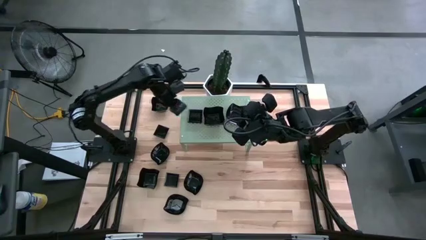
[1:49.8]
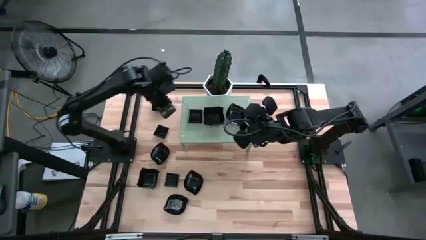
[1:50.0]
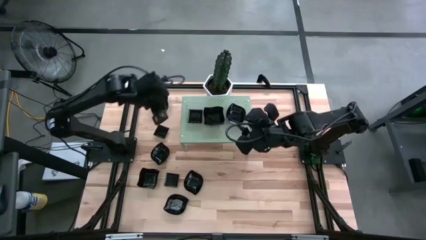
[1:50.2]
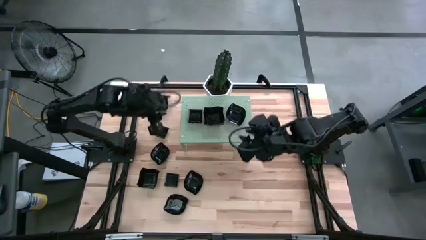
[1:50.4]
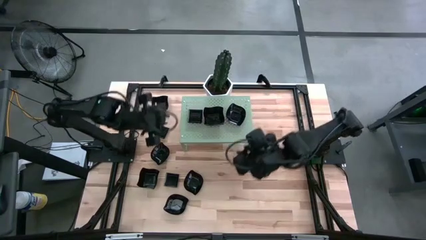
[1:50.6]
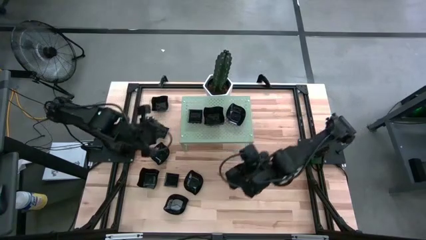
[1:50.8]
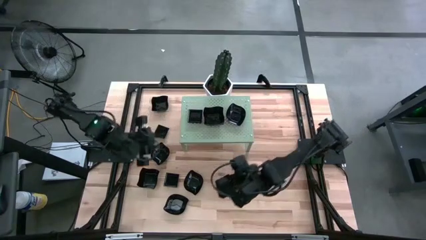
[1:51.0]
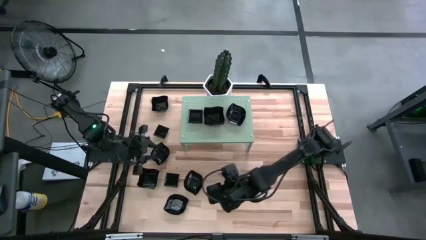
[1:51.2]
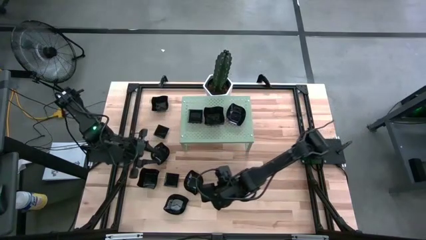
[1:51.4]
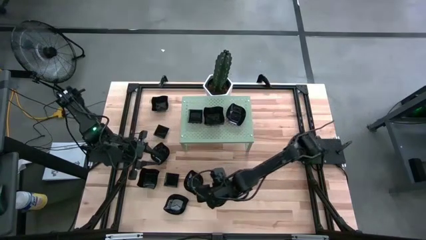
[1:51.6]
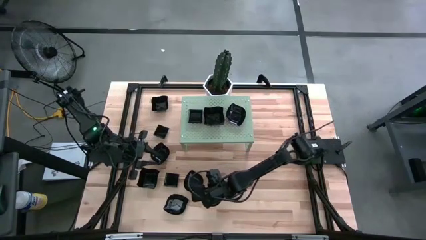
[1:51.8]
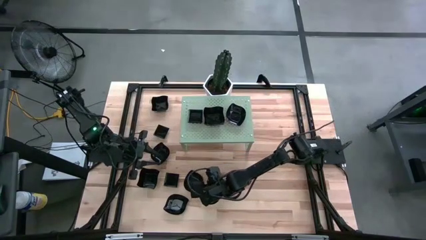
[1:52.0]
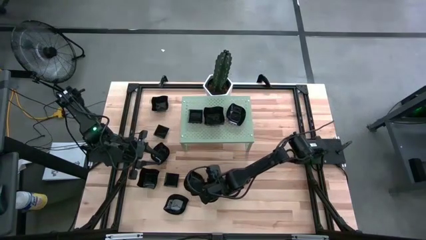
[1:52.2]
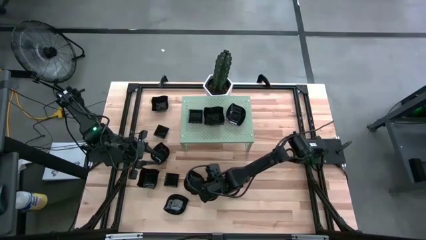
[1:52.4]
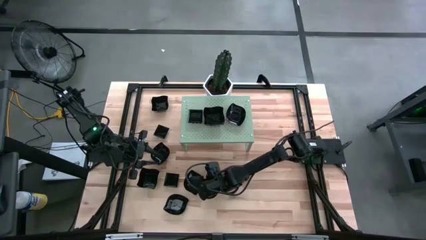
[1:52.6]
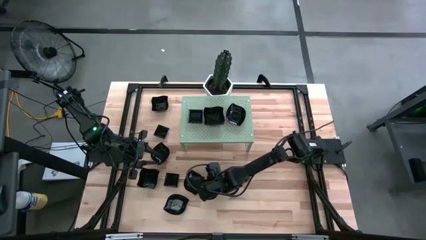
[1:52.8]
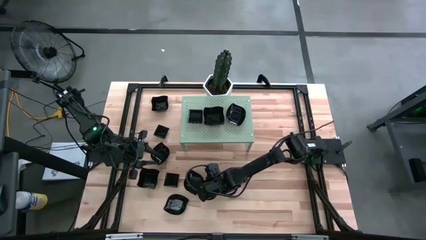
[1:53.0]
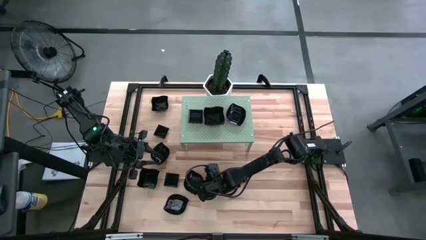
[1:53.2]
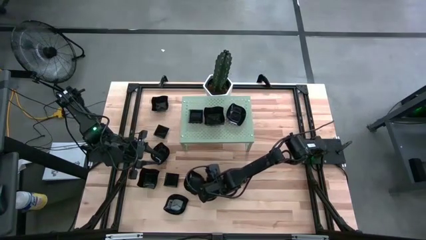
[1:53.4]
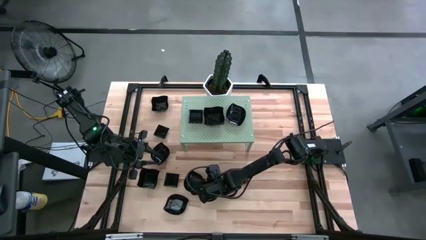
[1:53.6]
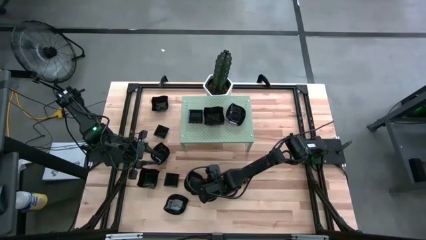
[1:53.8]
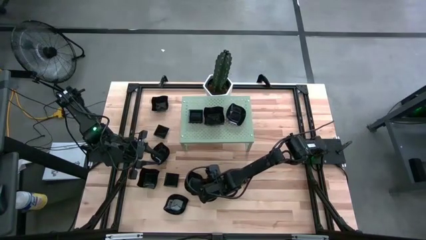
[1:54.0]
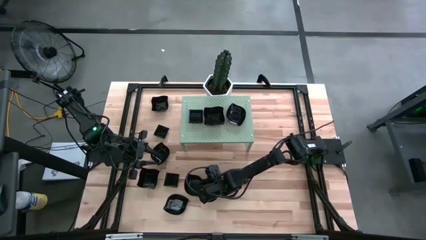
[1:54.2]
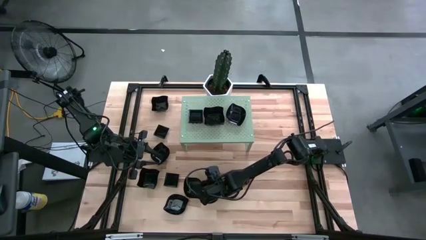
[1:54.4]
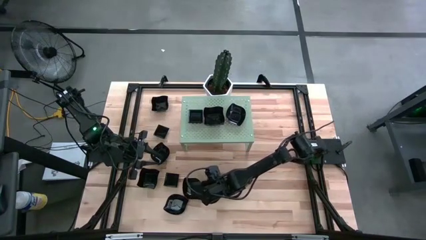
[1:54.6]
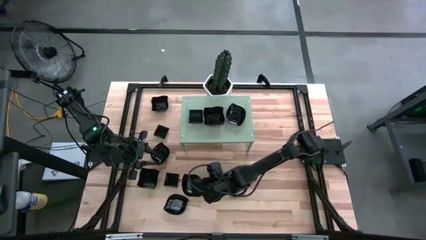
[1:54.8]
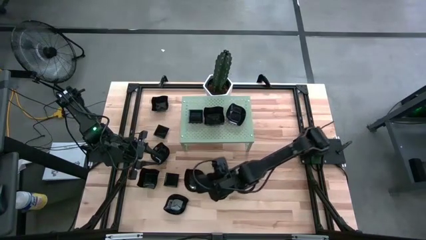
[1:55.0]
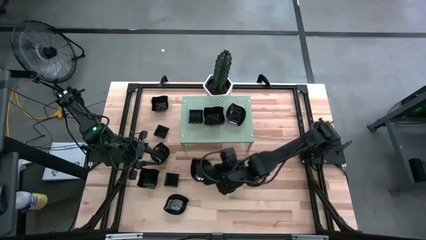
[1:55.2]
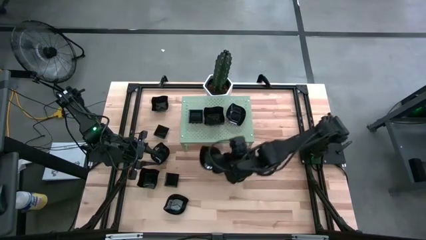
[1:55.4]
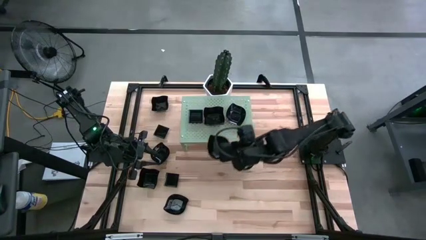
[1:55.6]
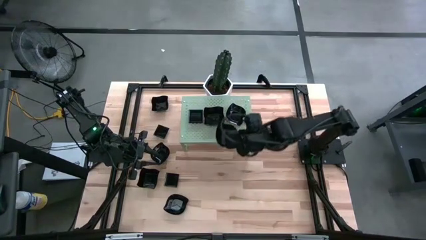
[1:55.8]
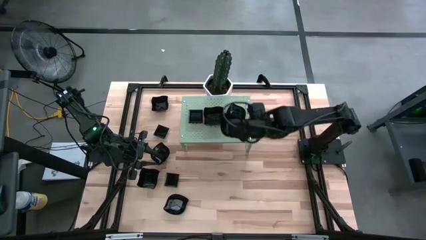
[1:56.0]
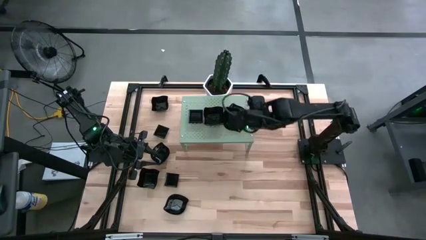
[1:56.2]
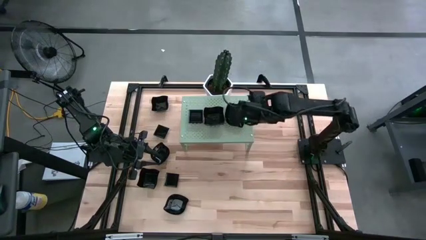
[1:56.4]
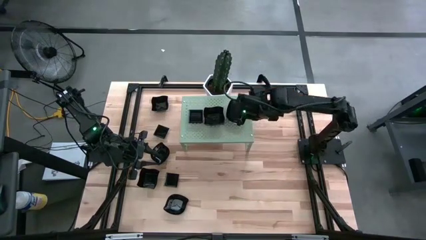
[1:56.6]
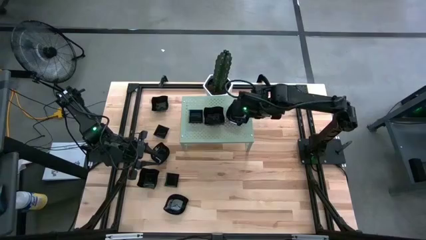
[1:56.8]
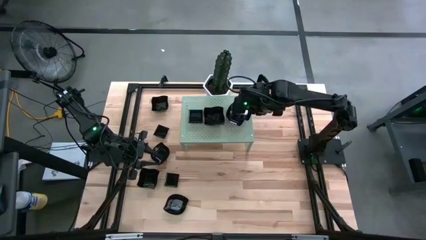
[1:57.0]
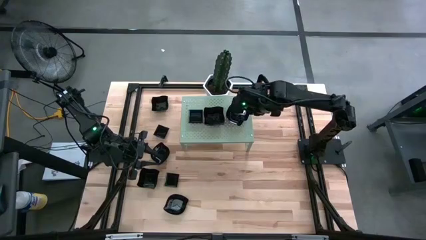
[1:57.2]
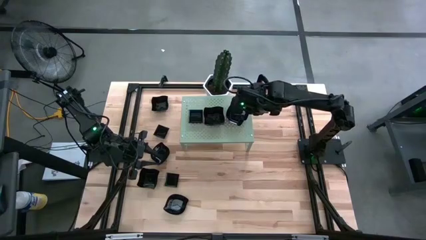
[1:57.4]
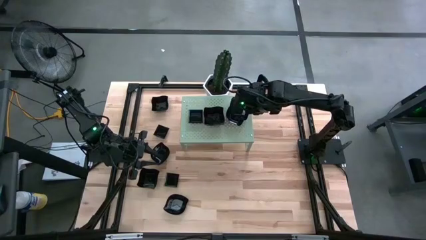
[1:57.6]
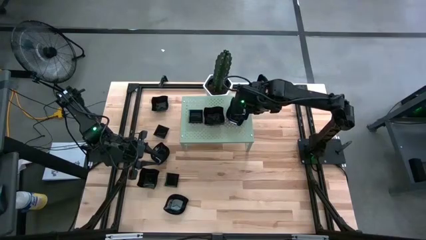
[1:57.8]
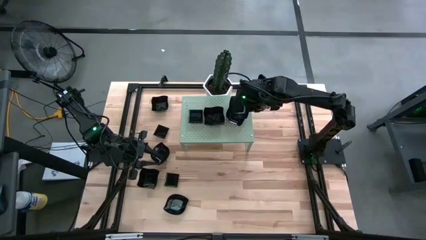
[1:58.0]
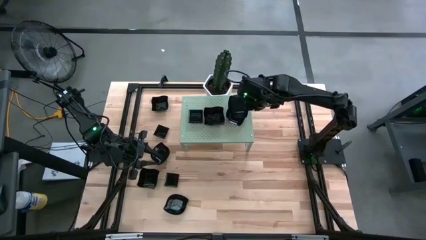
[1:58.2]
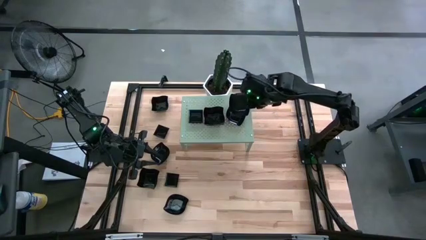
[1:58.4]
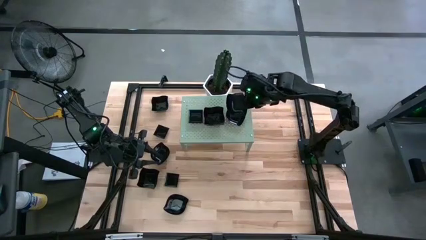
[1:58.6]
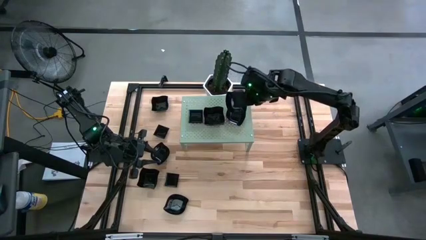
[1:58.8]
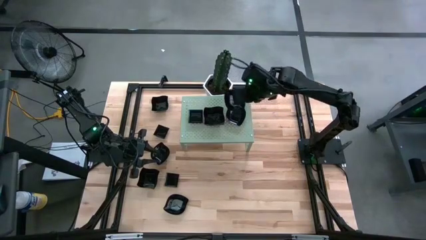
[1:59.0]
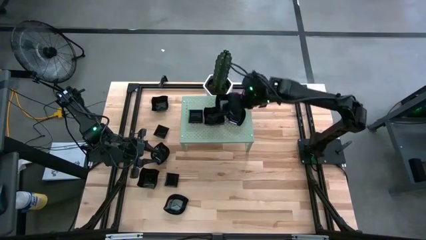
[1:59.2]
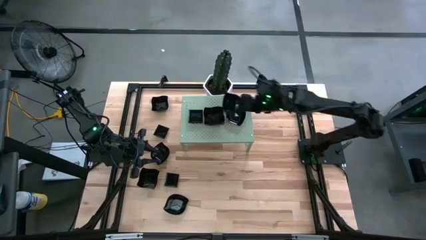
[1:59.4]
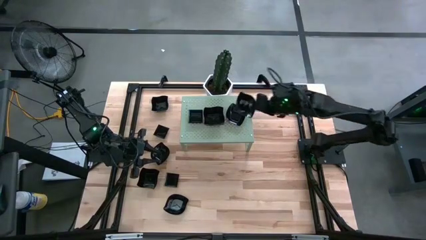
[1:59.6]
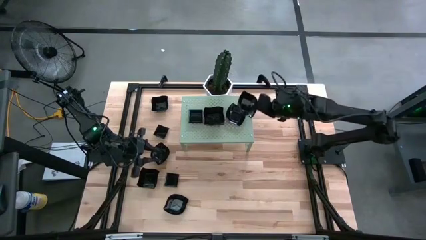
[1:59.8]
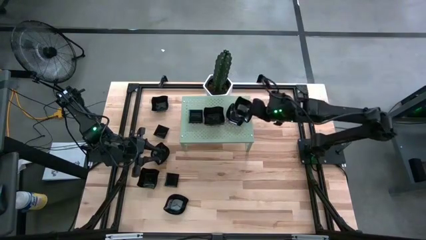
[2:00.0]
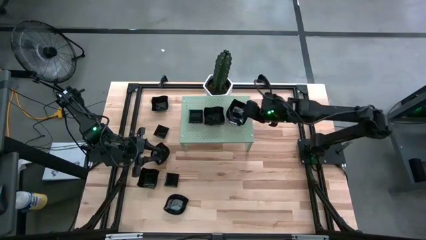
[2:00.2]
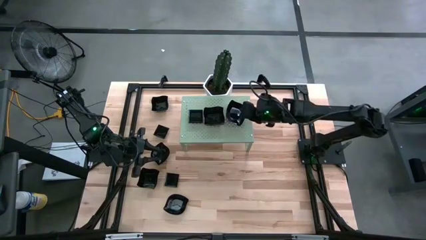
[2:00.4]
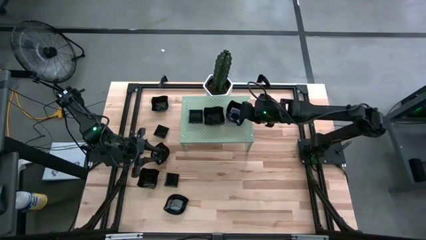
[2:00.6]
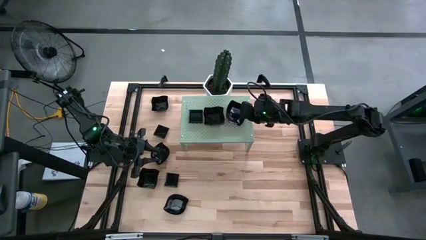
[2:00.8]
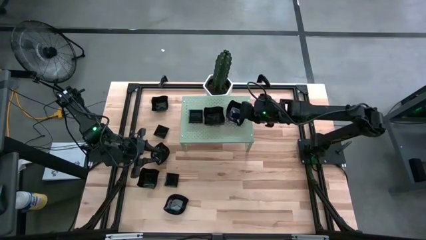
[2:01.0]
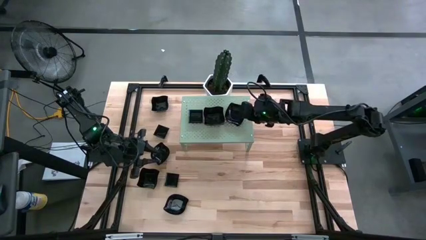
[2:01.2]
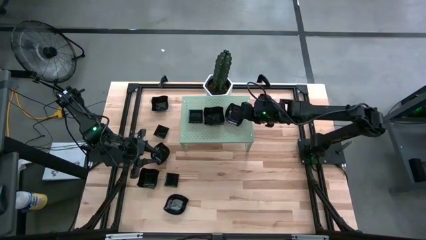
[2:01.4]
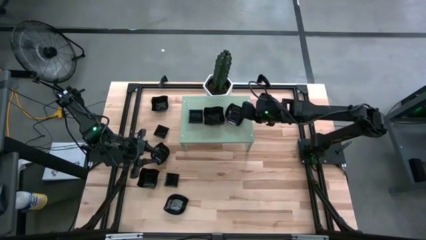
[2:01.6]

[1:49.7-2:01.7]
Task: Pick & Place Mini shaped plates
Stack the leaf shaped plate on top of the leaf shaped plates on the shelf

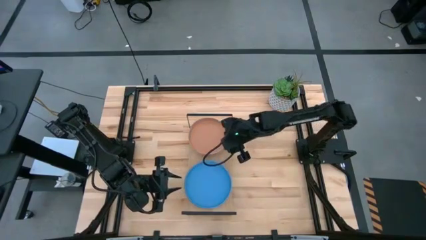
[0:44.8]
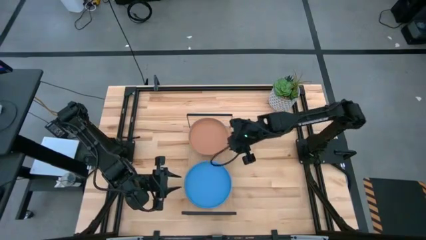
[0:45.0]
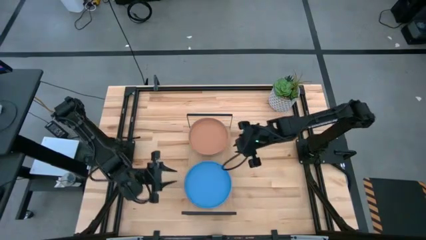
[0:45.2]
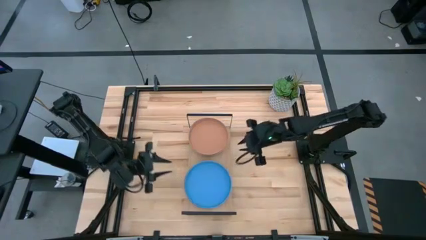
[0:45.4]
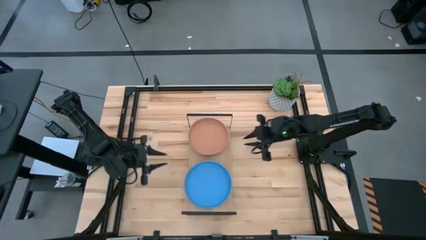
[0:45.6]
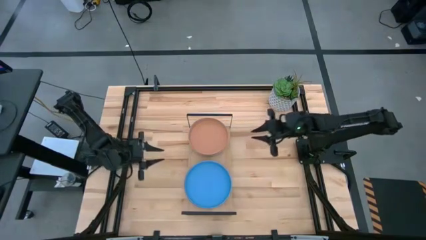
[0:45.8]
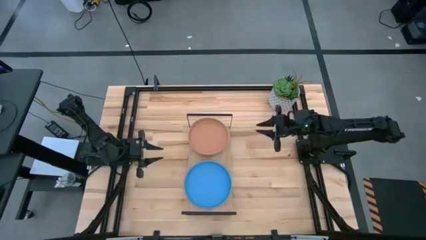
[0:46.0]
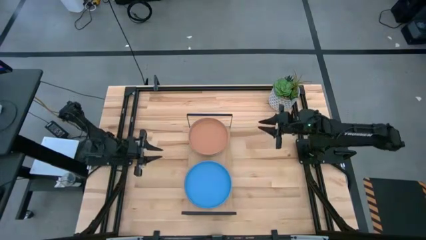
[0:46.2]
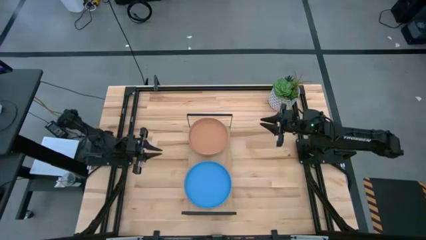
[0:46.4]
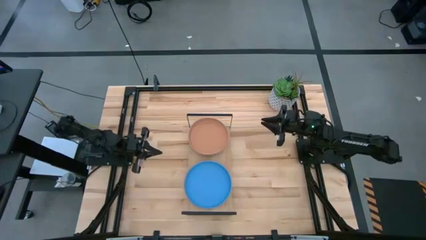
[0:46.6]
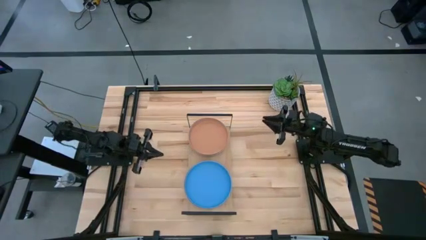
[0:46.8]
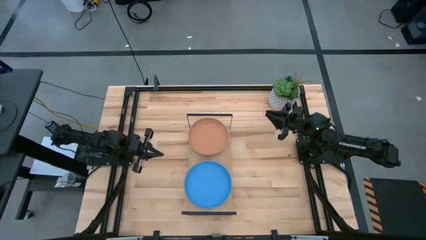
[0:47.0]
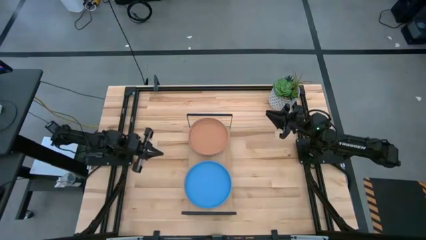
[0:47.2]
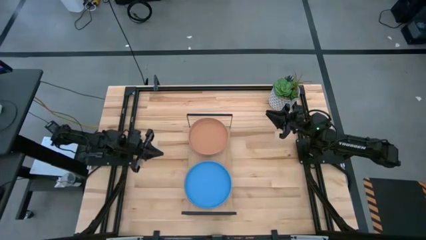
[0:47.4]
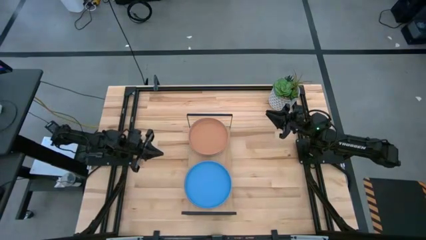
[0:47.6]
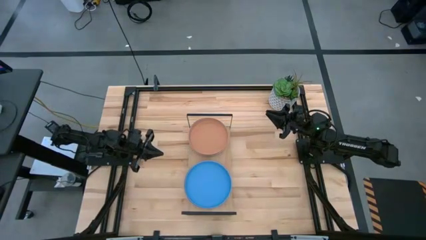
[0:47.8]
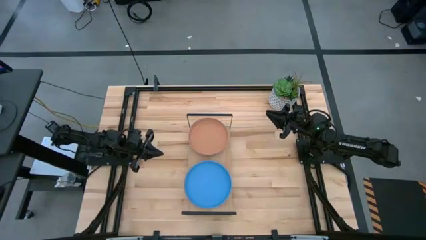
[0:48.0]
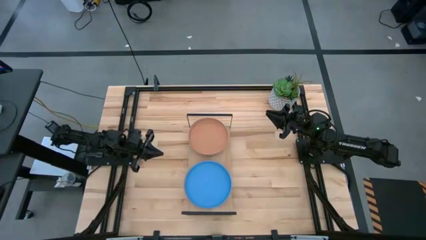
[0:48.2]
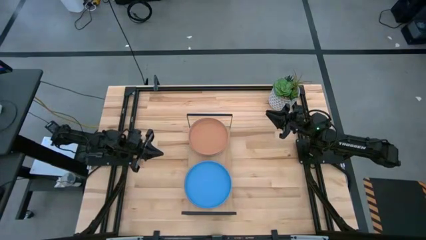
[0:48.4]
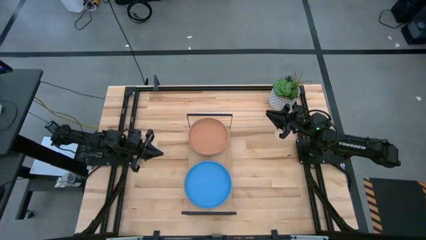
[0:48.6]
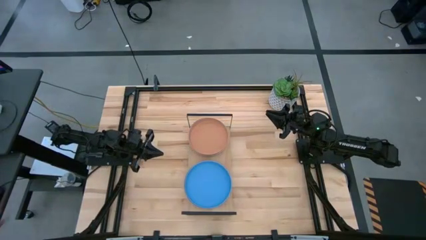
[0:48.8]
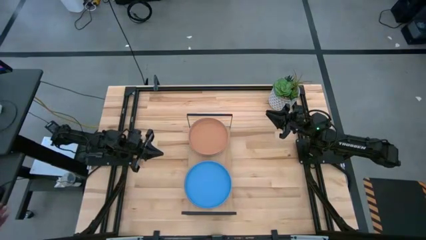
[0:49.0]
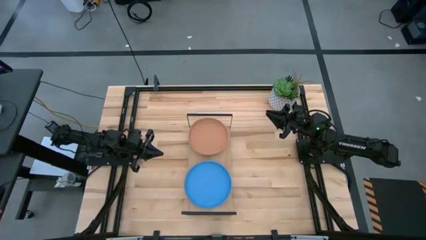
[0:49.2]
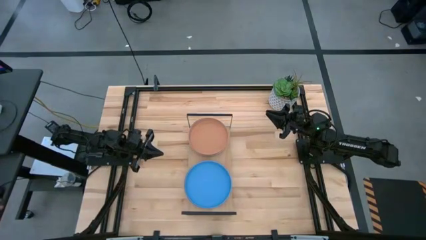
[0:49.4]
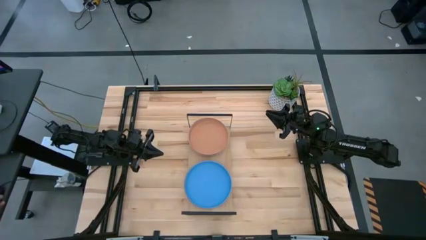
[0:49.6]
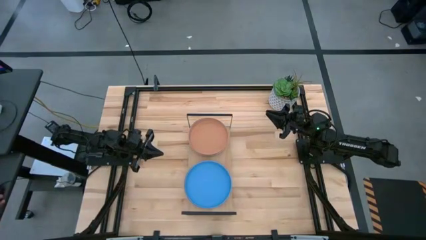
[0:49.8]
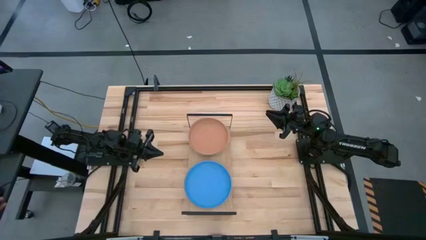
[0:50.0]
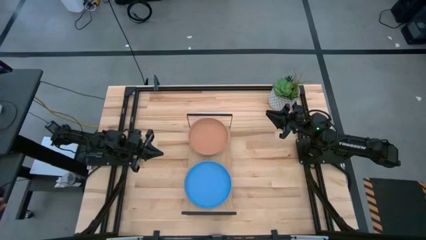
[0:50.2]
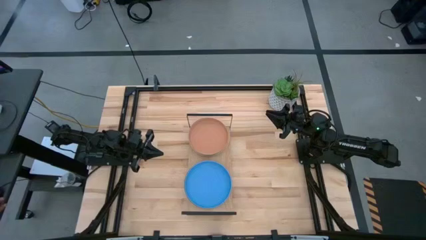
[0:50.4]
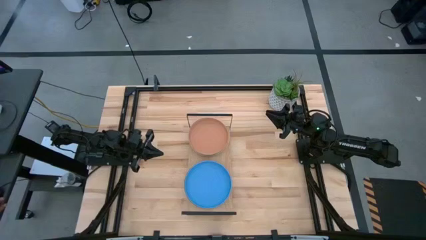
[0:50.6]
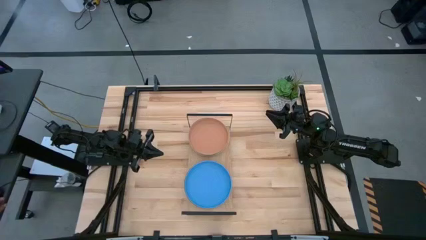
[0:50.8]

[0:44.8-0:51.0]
Task: Place and stack plates onto a shelf
Return to Home Position
